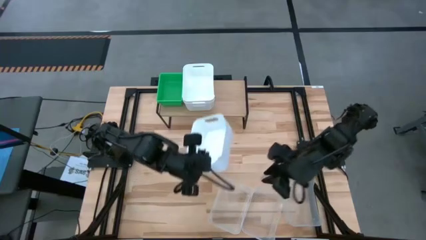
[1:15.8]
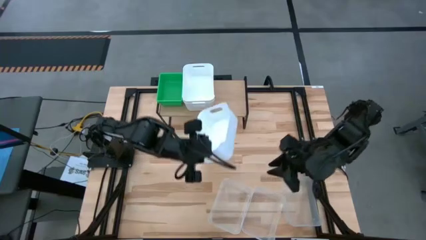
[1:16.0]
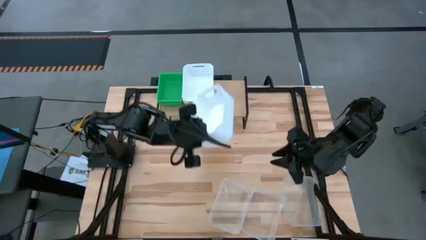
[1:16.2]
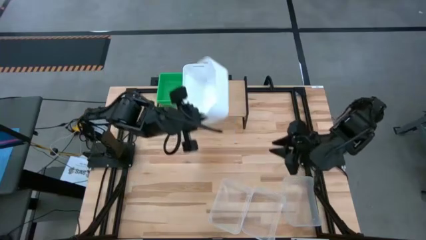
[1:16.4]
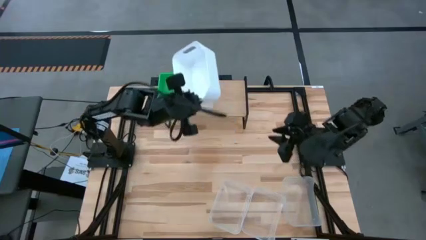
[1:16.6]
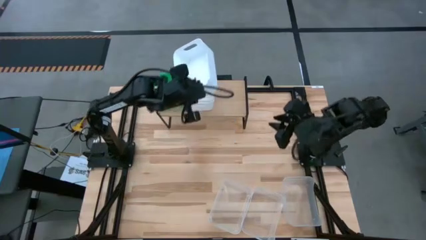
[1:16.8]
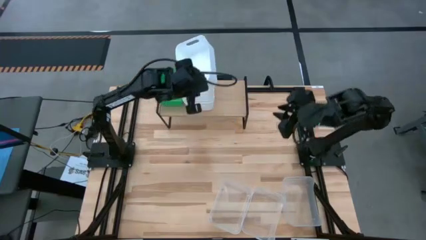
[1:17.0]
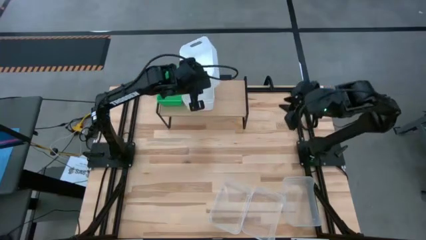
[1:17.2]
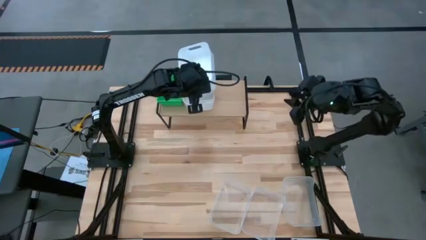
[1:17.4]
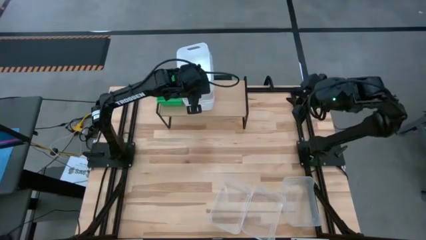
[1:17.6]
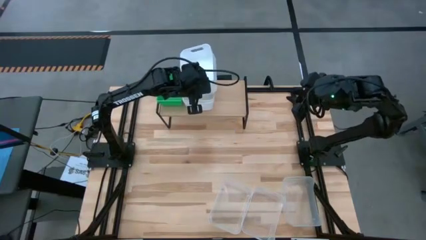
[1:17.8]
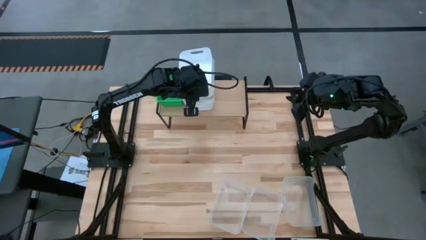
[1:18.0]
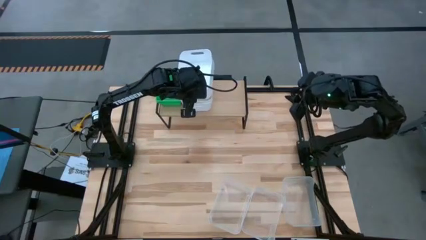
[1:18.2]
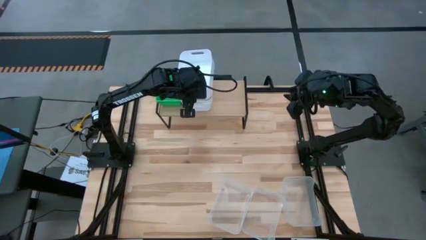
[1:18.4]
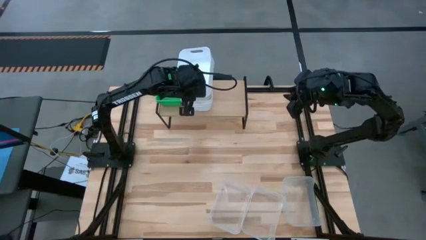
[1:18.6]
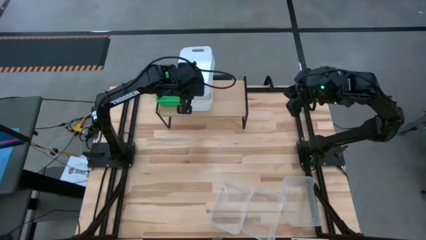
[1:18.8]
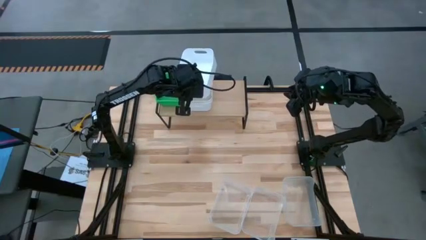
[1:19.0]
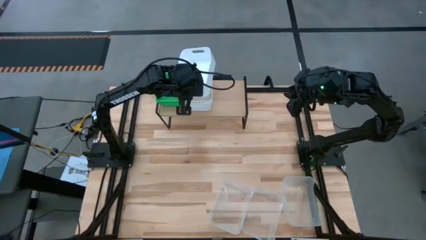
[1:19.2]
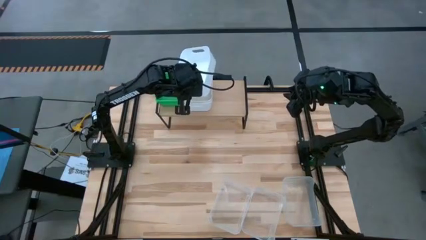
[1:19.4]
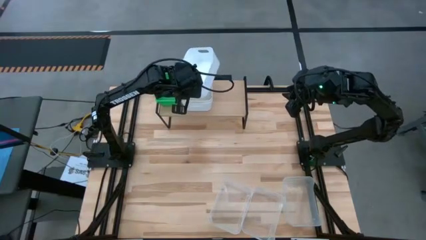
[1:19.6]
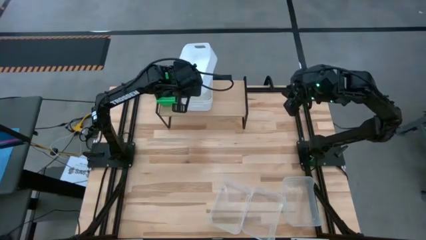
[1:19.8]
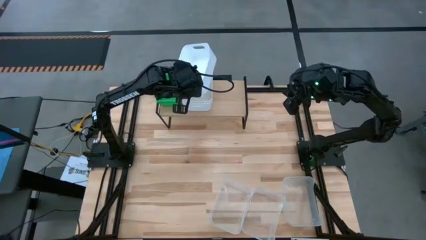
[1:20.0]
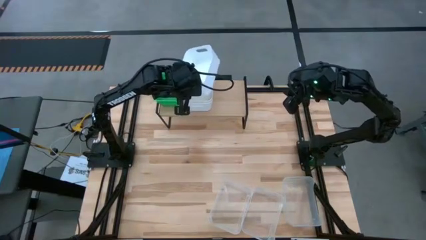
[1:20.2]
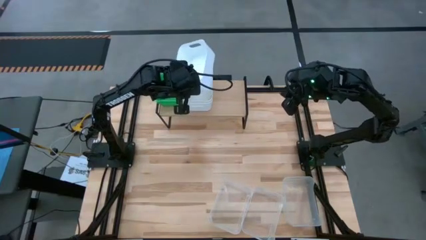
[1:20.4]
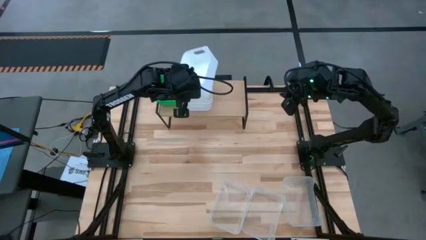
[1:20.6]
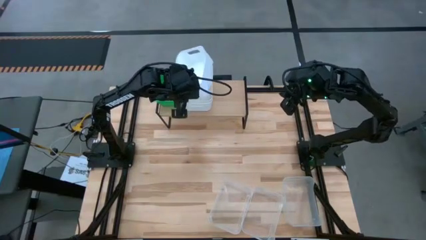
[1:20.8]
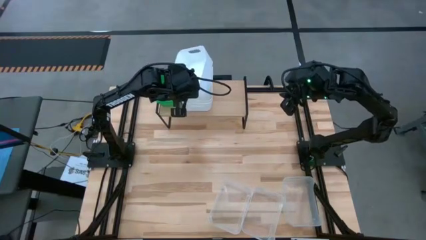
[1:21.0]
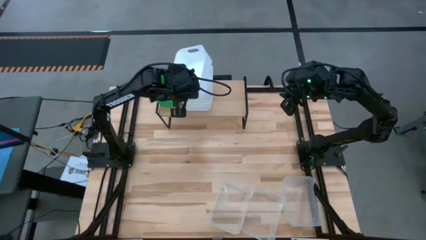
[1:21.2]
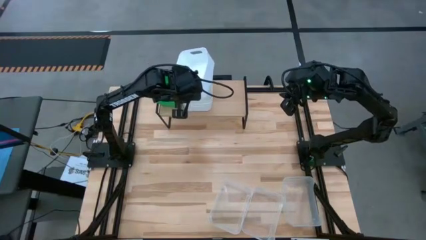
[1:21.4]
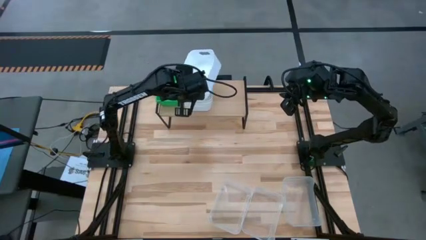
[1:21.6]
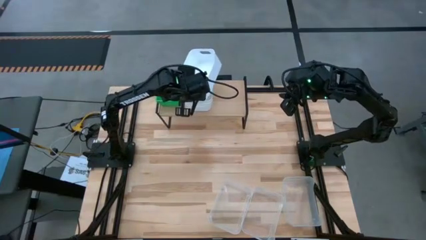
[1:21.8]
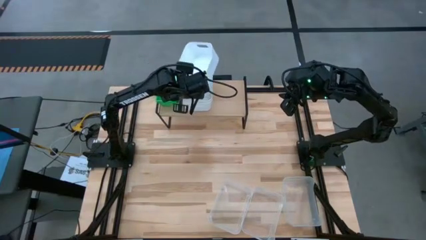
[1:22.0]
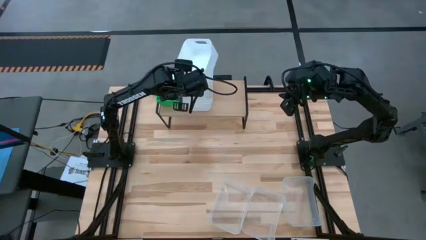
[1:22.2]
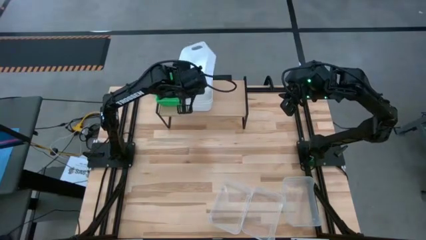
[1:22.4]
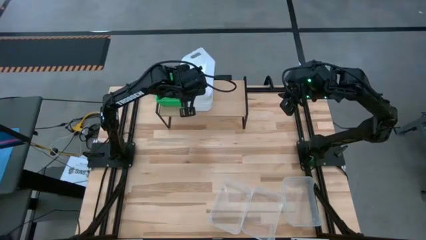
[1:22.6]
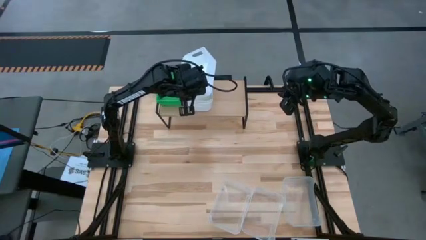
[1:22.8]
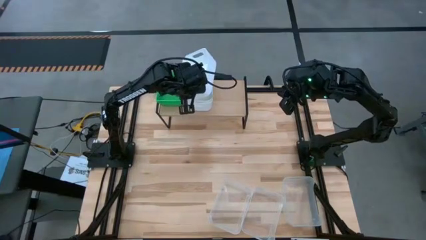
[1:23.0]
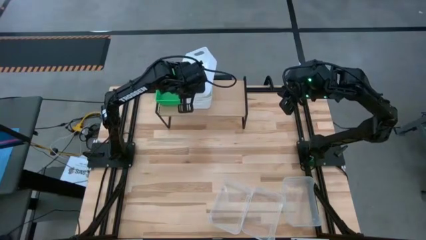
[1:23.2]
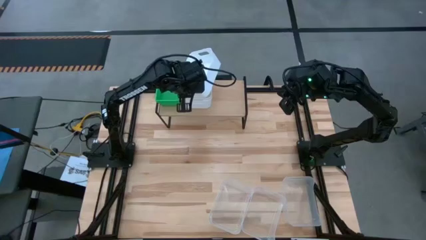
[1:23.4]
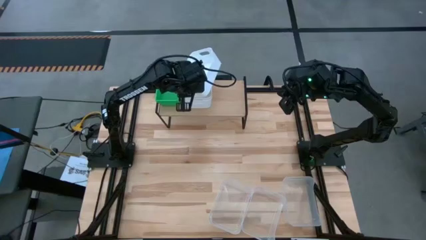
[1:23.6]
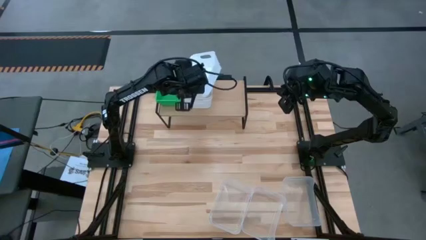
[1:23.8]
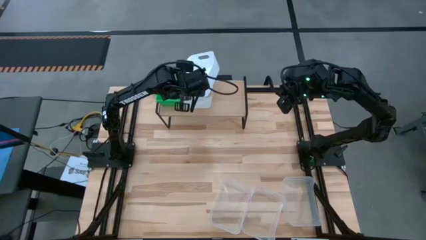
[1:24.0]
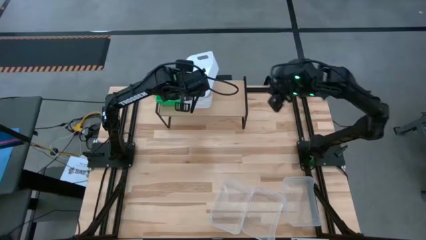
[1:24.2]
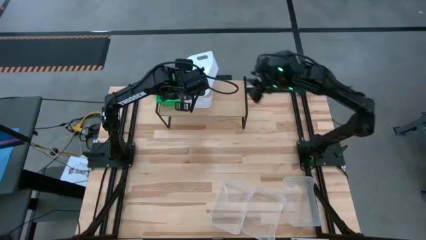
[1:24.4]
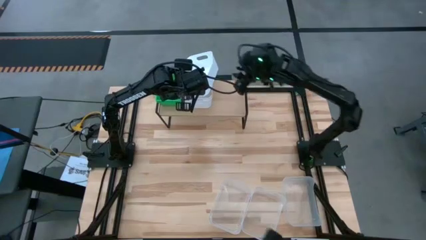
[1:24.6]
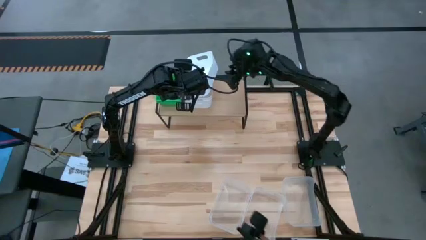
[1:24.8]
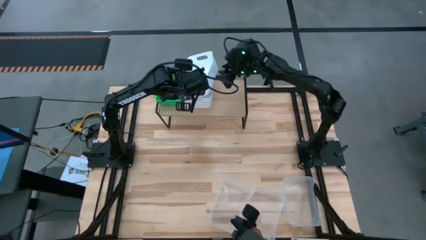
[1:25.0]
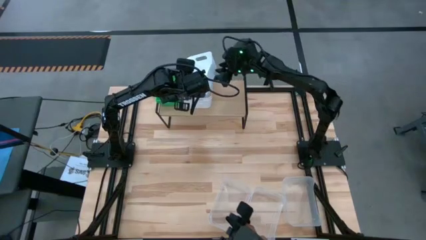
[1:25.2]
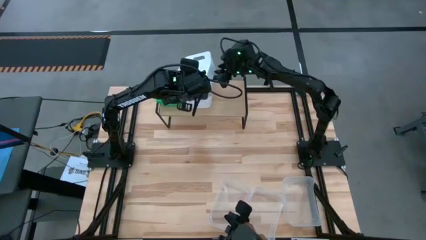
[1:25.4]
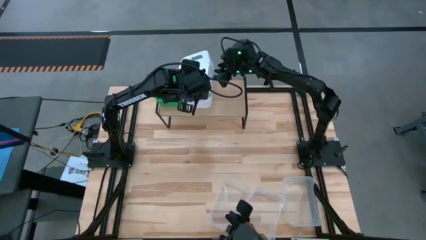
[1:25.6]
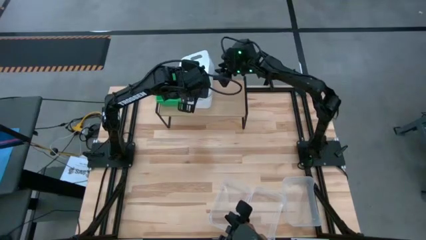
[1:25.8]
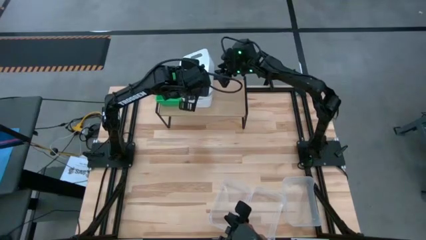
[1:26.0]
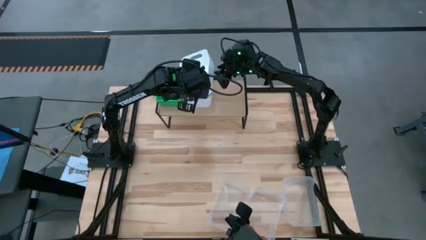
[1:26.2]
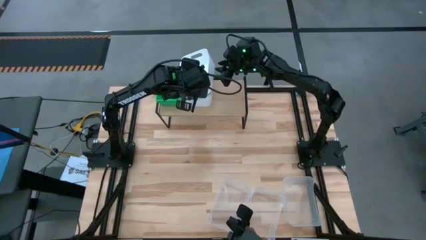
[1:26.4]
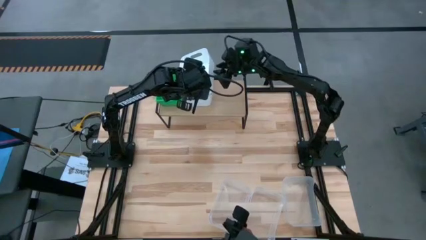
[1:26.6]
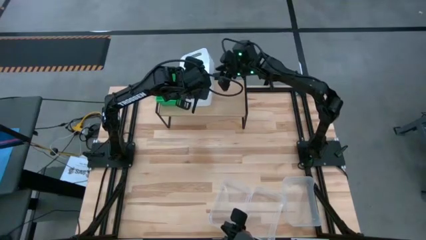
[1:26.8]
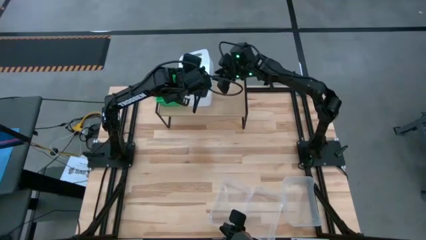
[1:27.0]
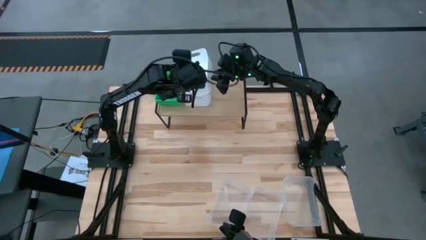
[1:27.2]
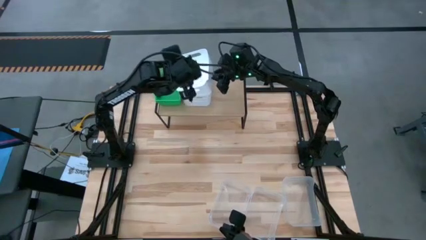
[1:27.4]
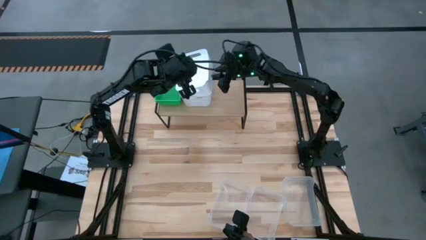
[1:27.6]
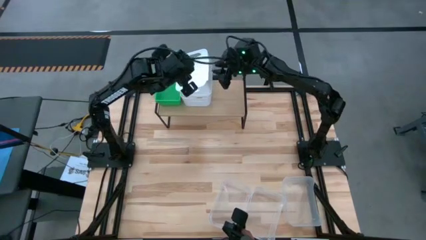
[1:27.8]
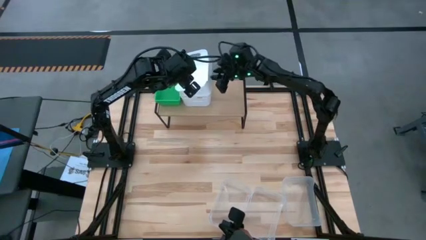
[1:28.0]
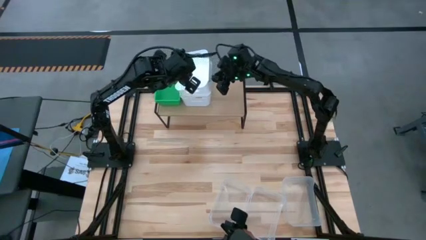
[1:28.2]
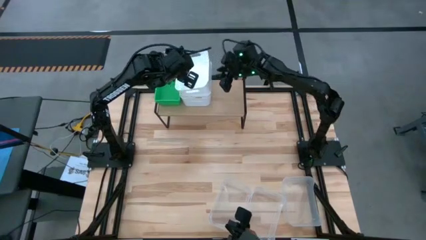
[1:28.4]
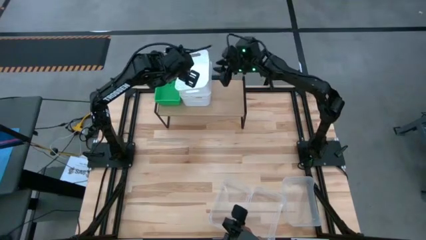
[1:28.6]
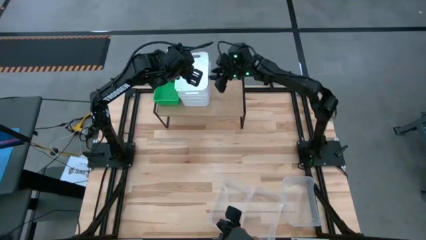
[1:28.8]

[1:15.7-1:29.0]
Task: Stack baskets on shelf by color
Stack the white bin on top of the white bin on the shelf

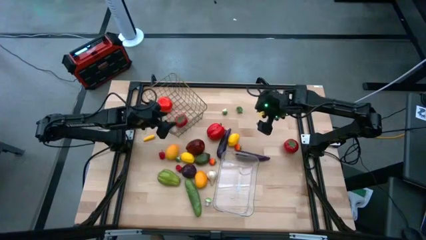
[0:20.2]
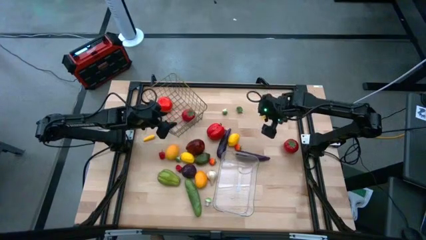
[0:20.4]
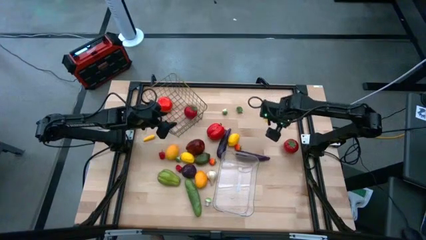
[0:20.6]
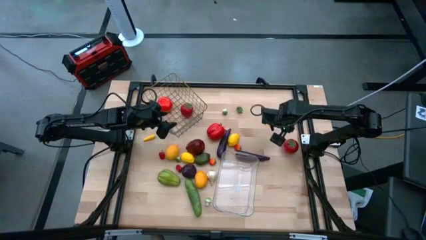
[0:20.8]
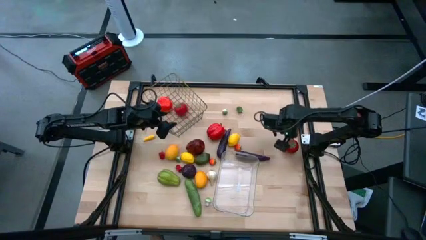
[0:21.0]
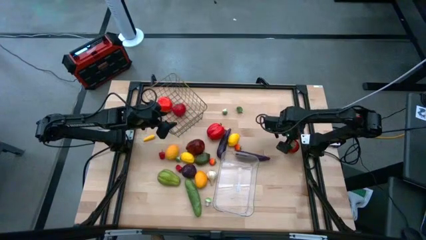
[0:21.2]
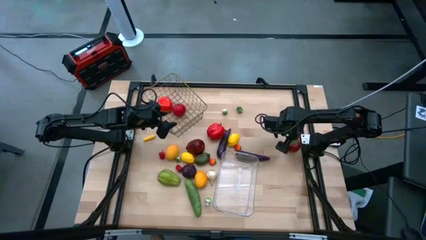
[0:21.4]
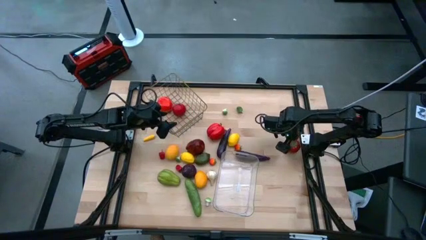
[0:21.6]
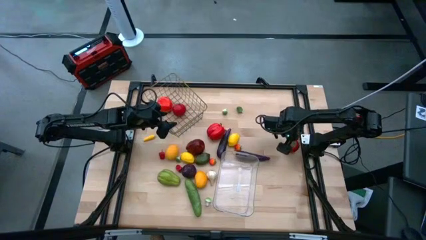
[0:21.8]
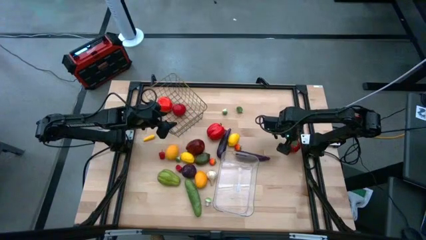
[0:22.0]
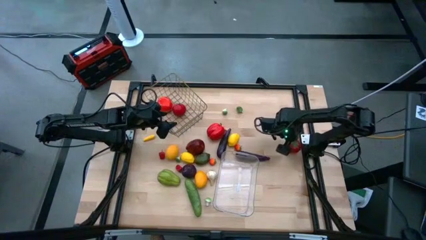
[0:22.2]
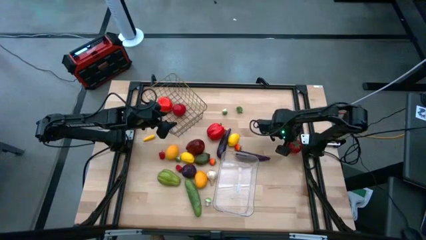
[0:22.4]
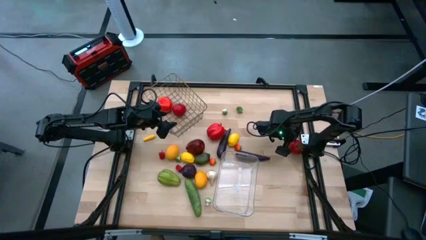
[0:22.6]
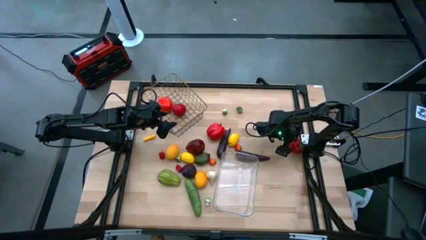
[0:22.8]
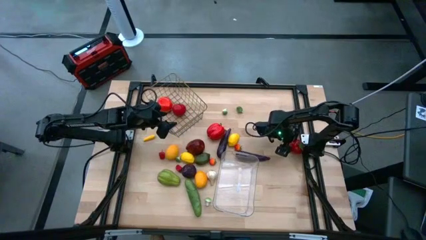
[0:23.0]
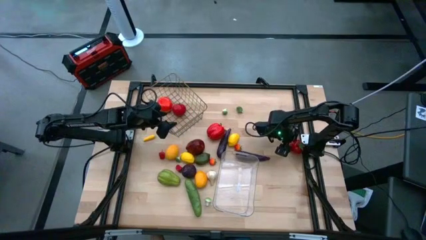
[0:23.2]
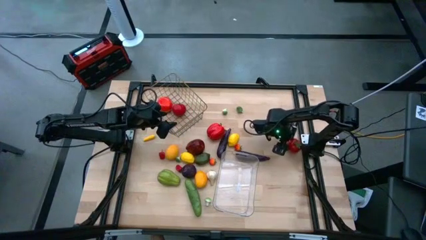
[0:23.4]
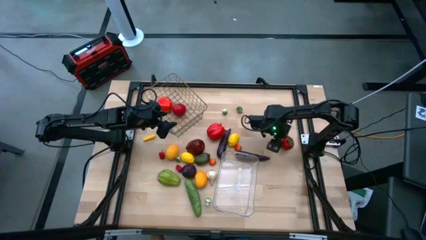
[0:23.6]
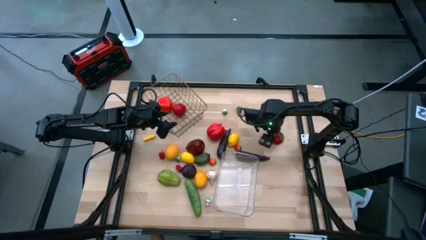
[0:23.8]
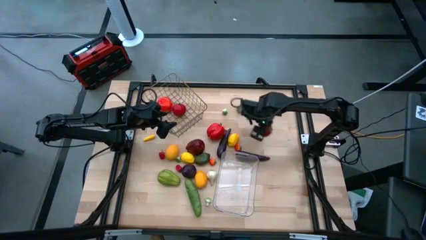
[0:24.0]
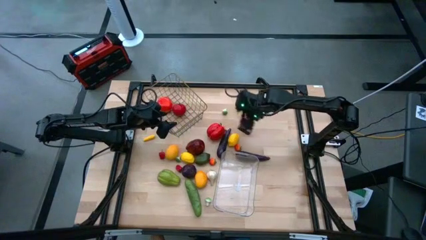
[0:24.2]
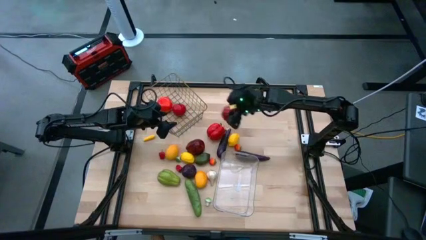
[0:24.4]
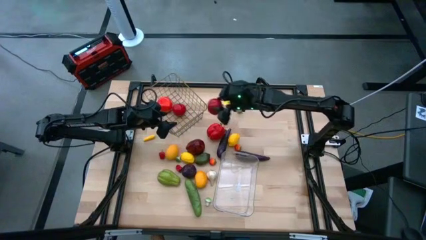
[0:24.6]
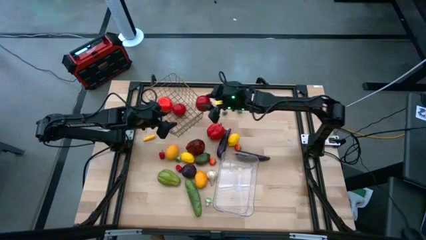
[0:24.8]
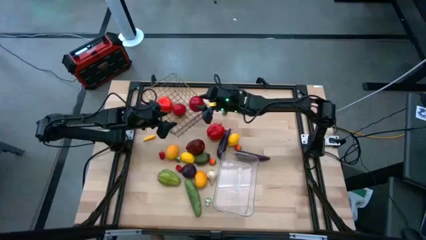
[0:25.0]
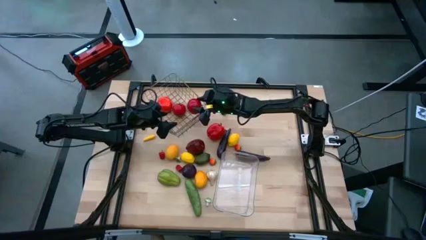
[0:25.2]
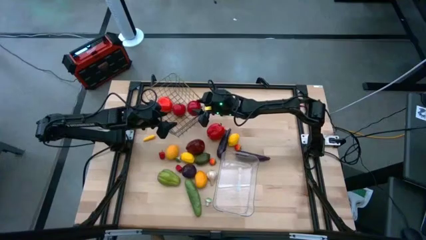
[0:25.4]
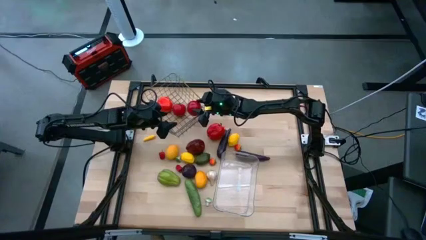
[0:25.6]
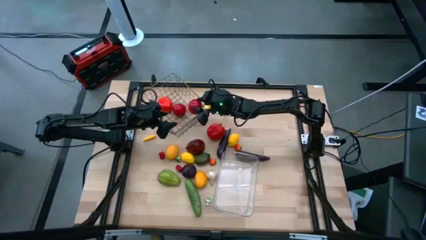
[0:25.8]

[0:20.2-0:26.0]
Task: Sort produce into baskets
Put the large red tomato into the wire basket
